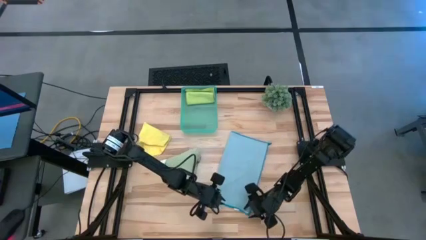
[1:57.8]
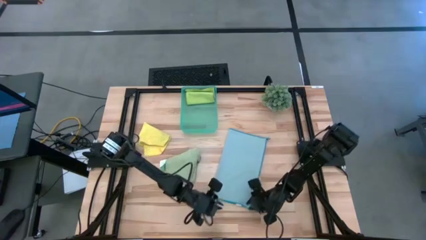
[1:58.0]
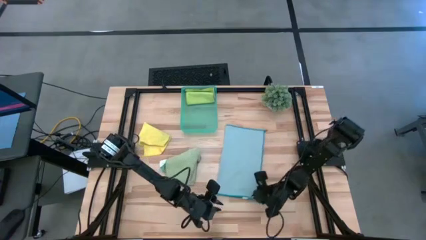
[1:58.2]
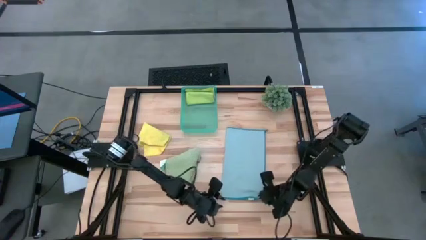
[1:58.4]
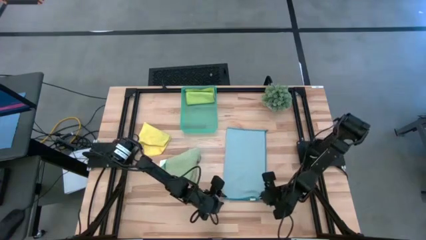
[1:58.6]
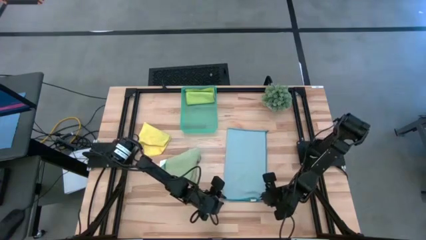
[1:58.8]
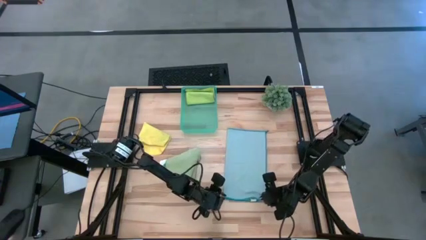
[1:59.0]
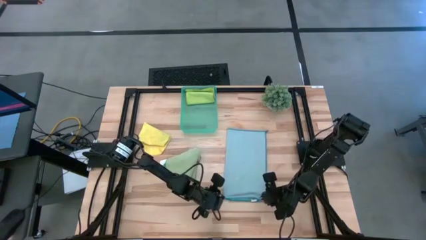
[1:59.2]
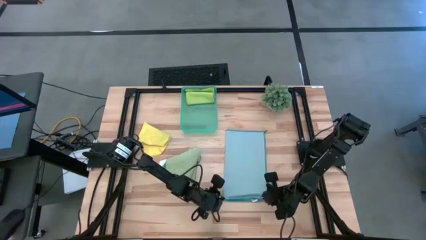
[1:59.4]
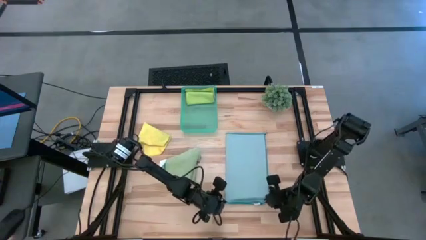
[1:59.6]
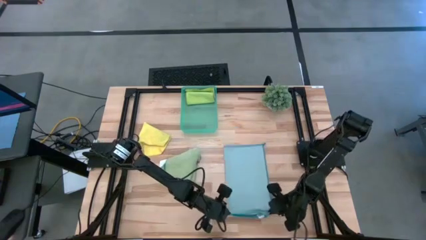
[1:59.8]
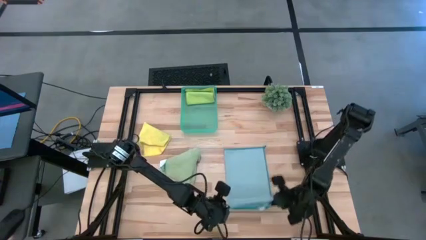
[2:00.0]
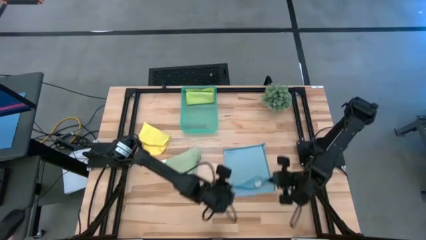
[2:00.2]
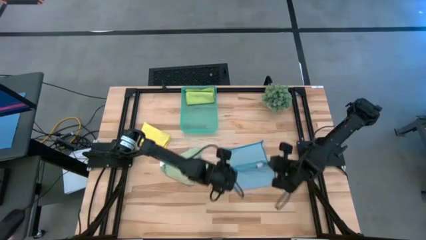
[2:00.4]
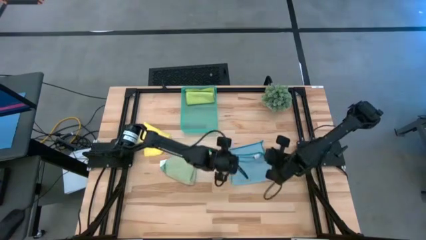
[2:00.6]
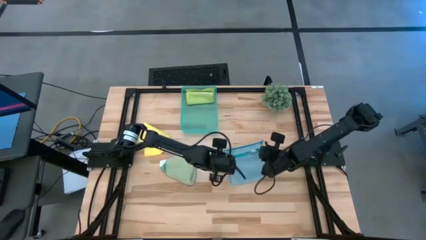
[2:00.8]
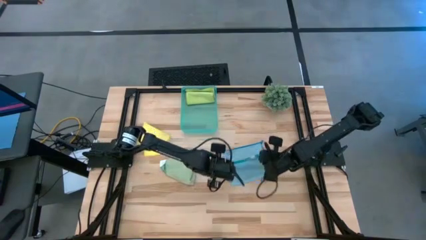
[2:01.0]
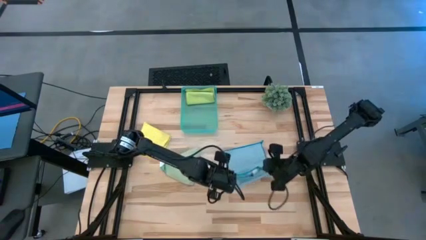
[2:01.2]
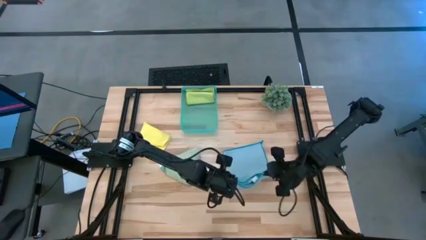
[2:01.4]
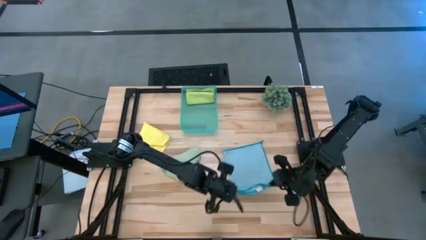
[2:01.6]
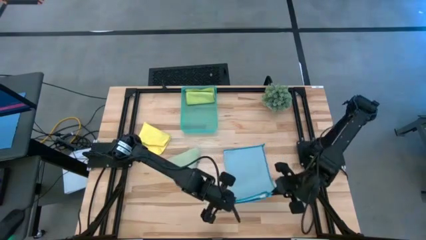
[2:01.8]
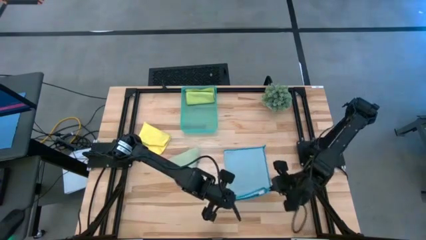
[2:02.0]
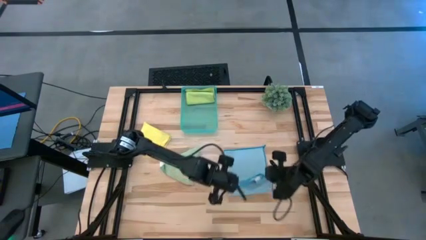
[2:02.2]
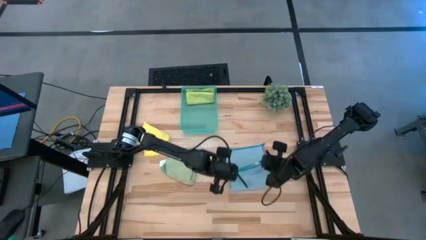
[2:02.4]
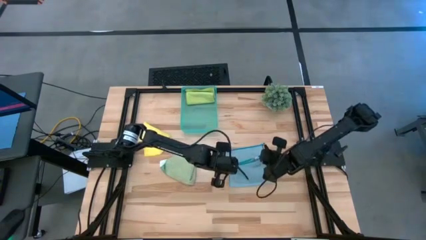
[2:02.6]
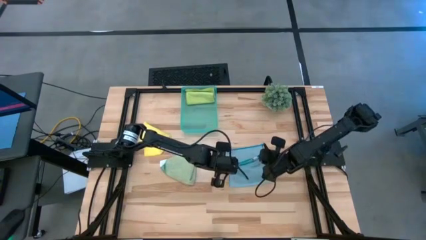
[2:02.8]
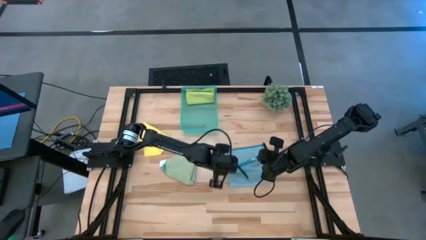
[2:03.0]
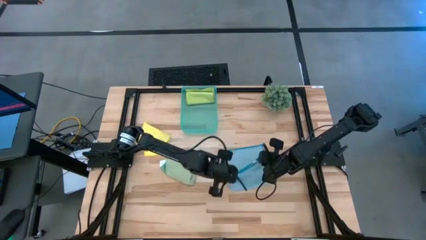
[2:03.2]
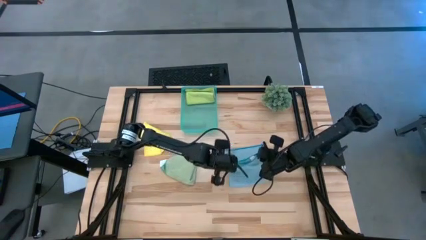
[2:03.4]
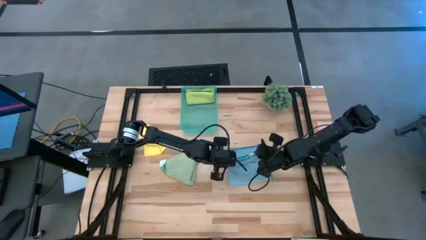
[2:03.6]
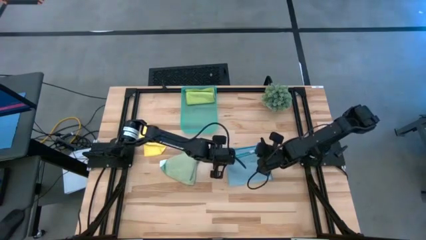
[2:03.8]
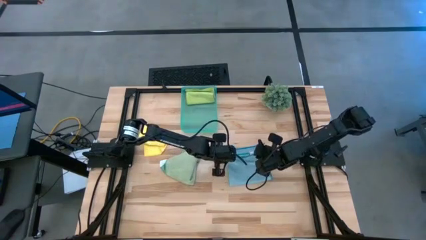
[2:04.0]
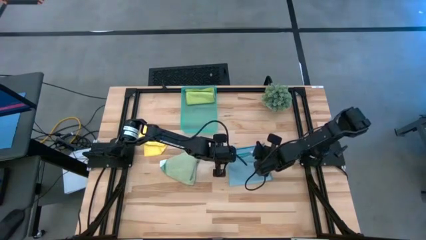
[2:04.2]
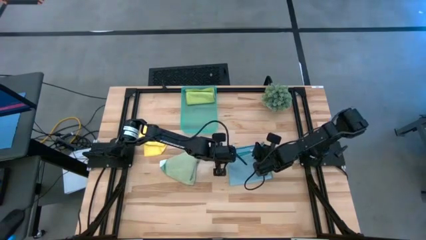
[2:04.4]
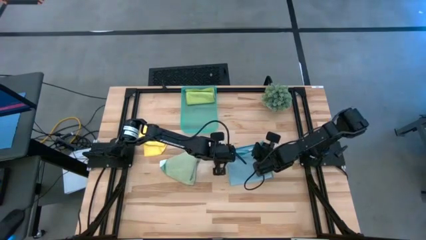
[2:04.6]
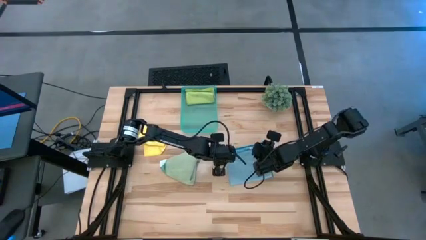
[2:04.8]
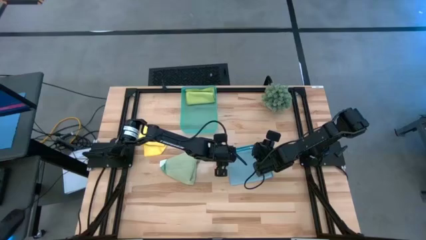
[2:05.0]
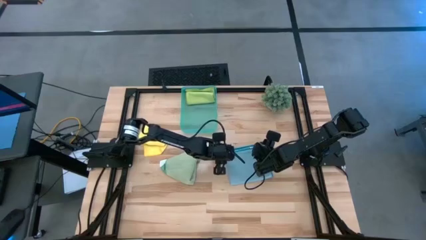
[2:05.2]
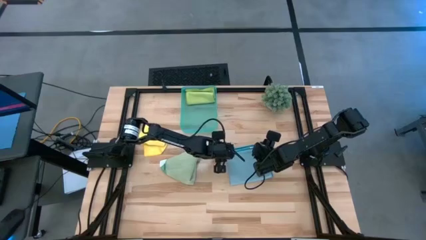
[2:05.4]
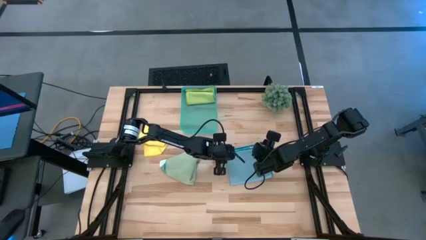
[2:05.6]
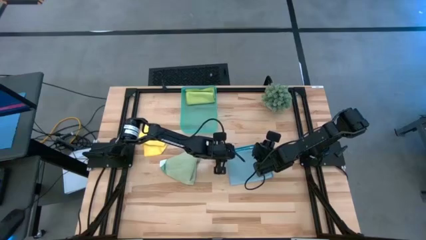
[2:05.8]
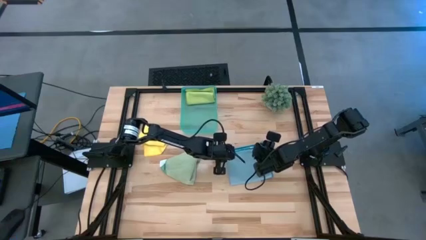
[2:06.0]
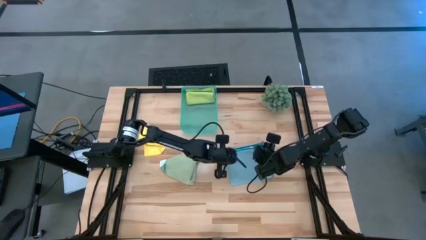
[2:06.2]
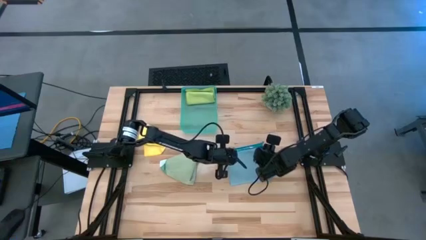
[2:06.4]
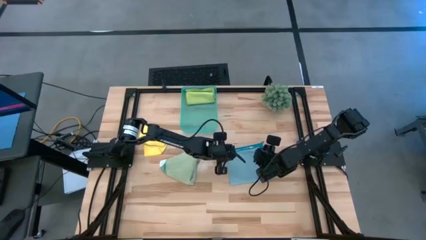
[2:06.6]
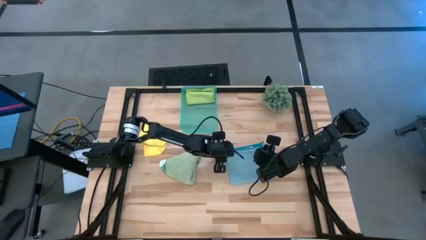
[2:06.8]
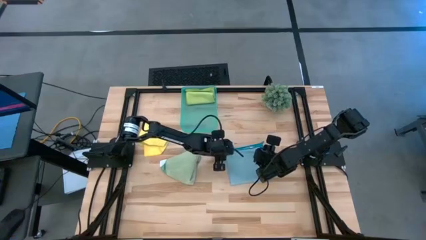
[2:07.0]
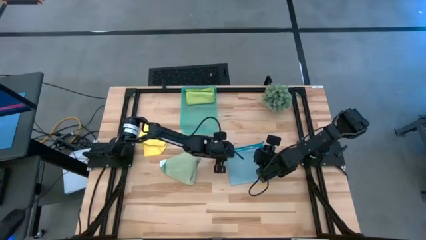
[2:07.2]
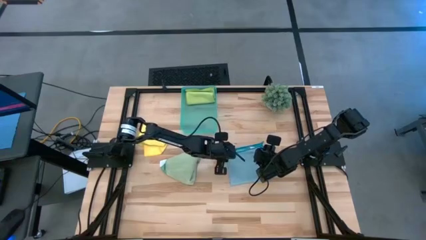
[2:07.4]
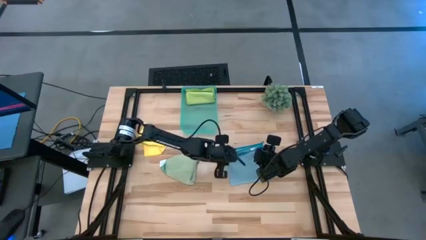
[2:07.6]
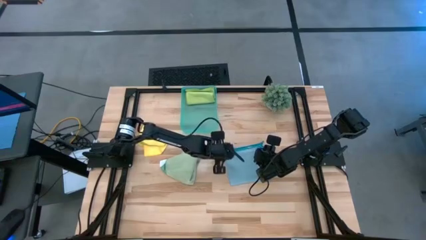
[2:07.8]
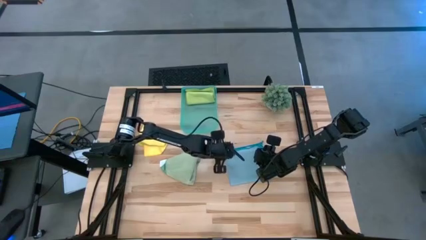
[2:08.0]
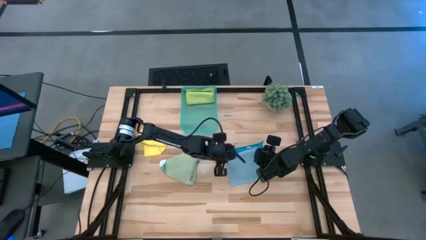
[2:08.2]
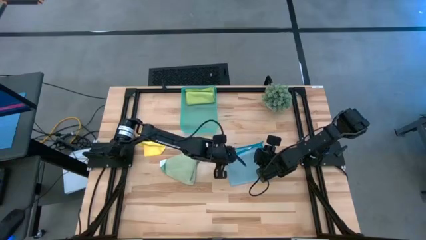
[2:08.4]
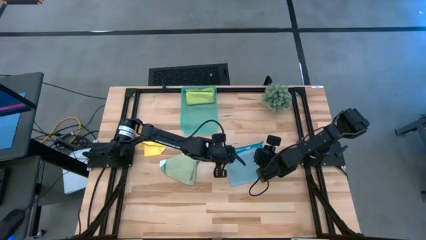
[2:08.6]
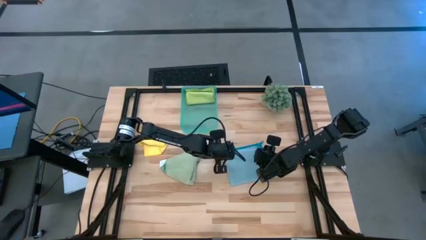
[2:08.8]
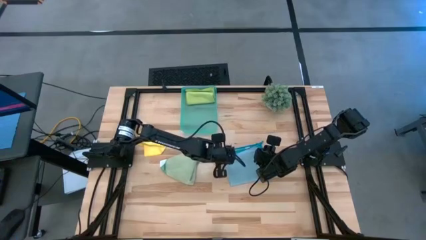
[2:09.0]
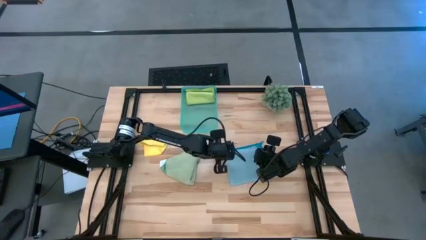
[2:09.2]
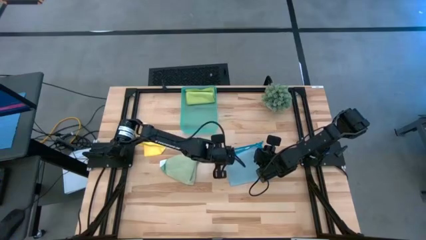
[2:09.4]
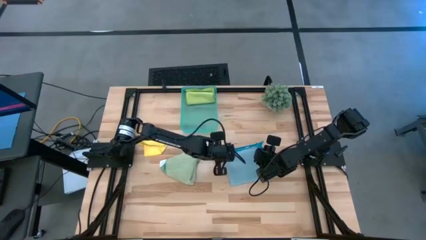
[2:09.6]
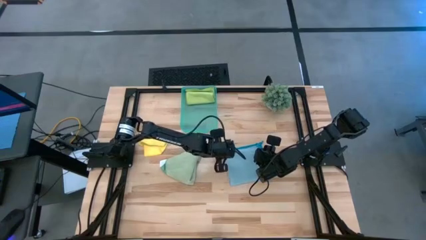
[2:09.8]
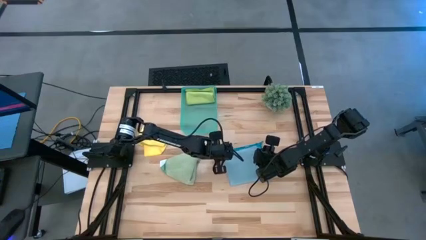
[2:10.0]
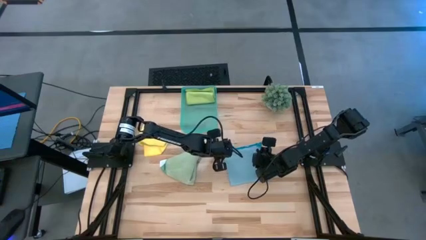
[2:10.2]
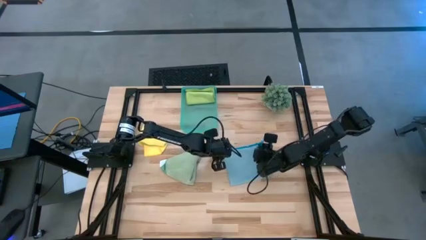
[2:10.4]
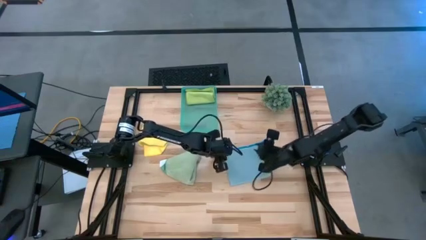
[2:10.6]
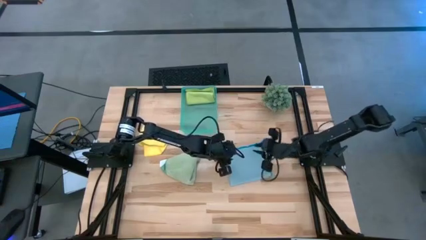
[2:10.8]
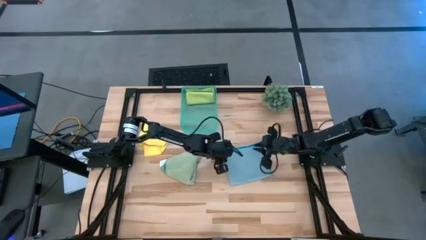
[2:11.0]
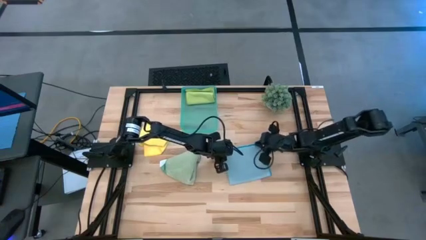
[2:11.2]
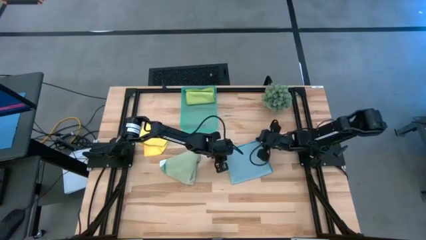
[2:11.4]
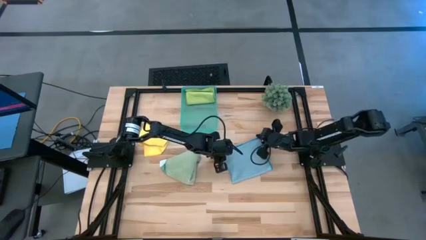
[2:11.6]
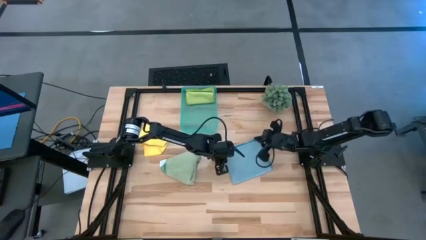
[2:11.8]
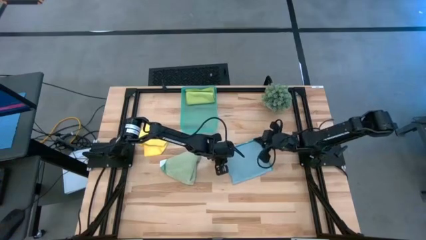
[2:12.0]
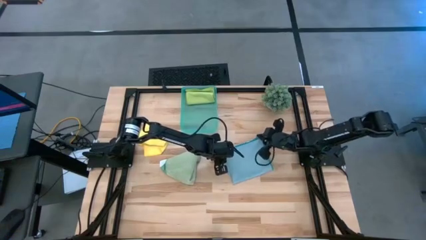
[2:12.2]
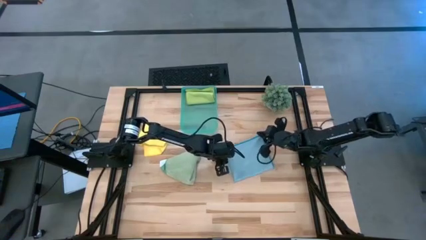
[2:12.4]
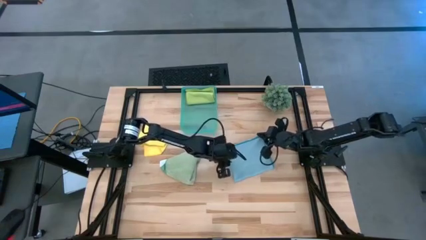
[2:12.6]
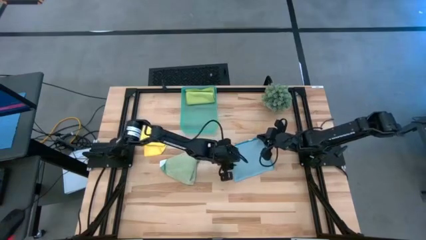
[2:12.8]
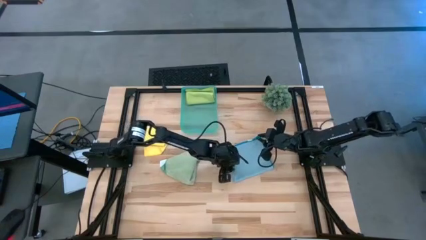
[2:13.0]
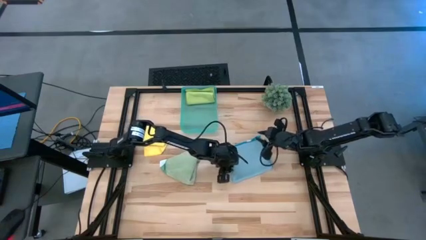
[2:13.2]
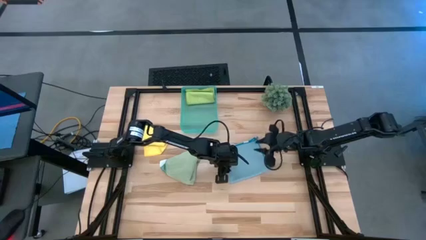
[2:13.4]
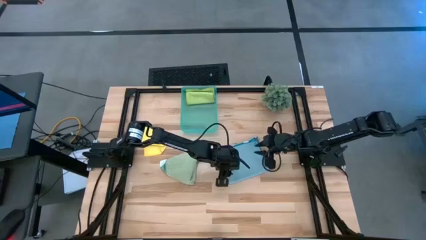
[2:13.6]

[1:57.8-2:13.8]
Task: Fold microfiber towels
Fold the blue microfiber cloth
